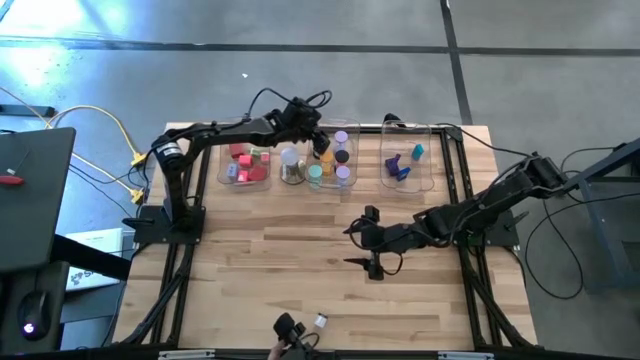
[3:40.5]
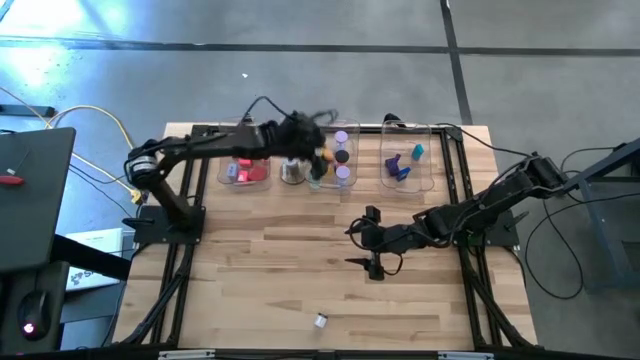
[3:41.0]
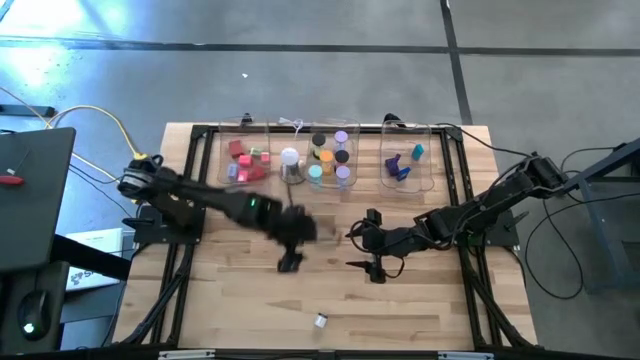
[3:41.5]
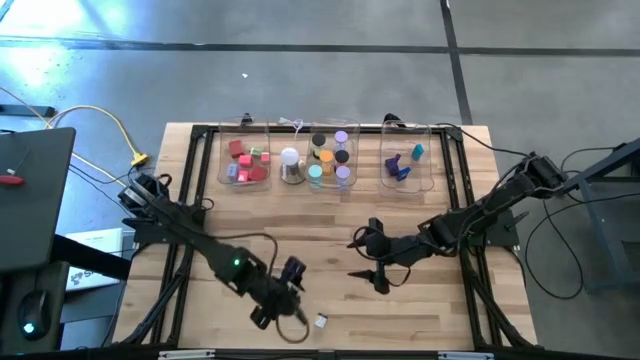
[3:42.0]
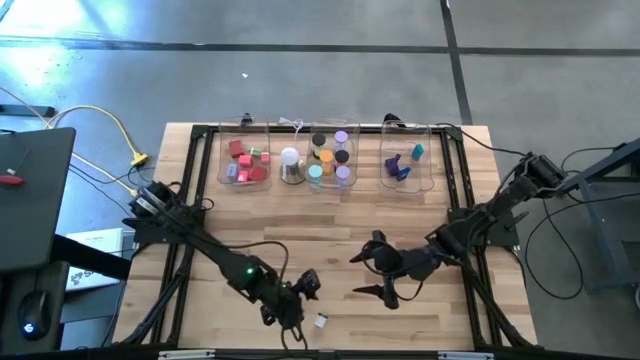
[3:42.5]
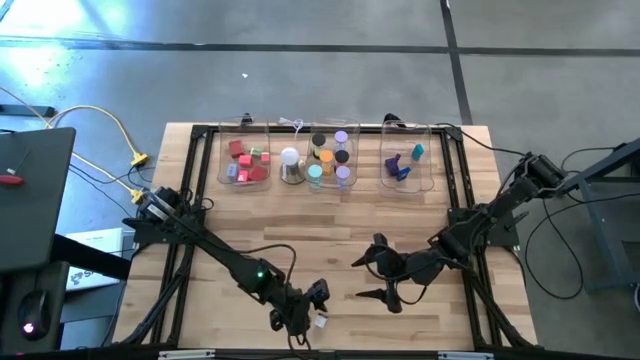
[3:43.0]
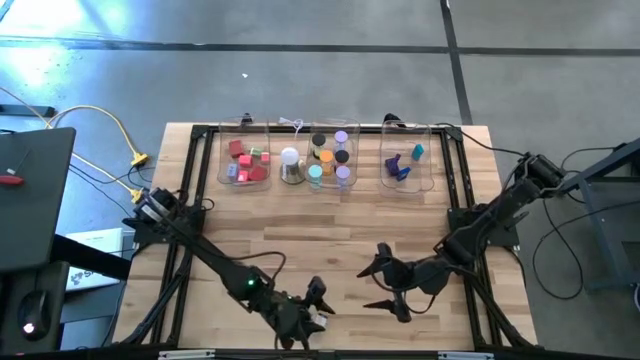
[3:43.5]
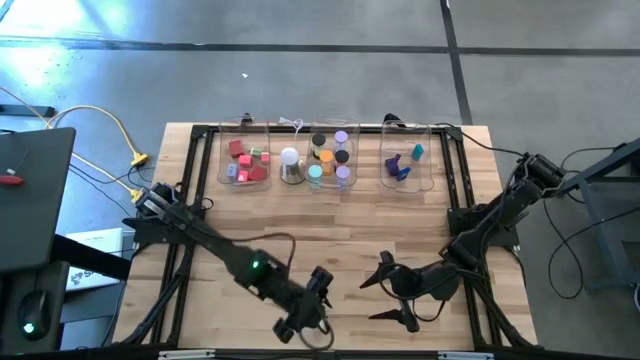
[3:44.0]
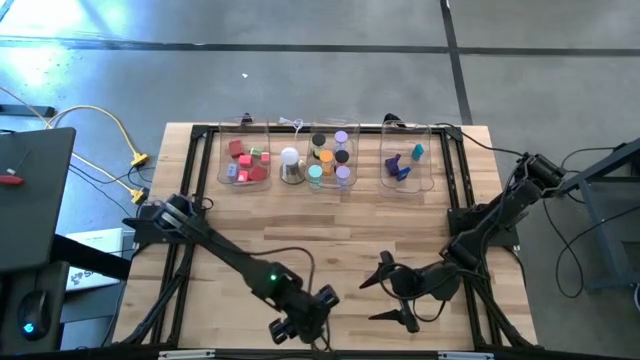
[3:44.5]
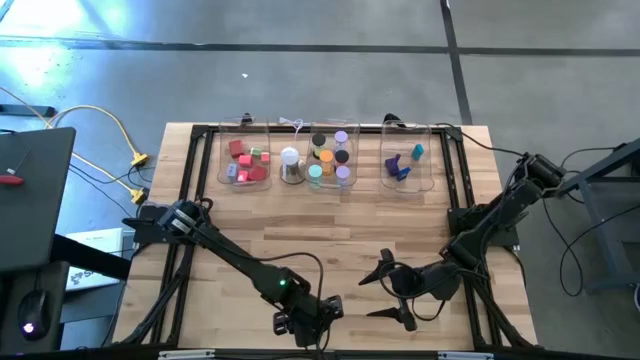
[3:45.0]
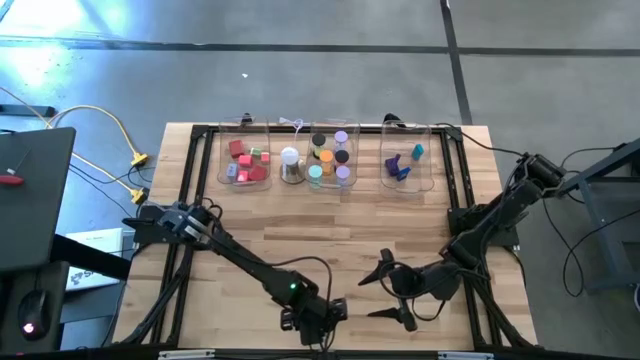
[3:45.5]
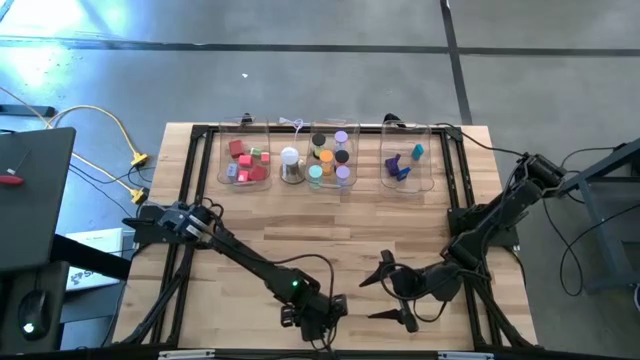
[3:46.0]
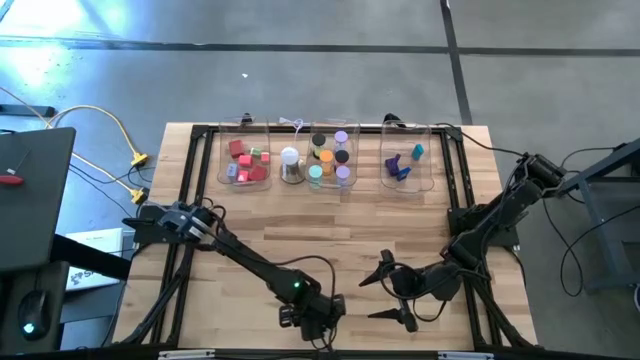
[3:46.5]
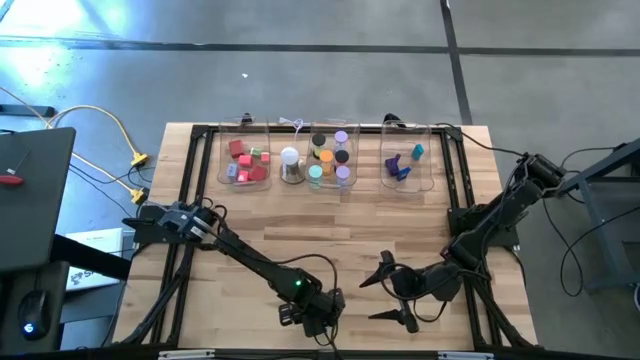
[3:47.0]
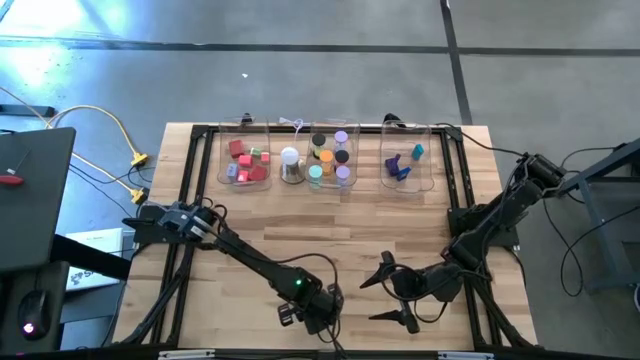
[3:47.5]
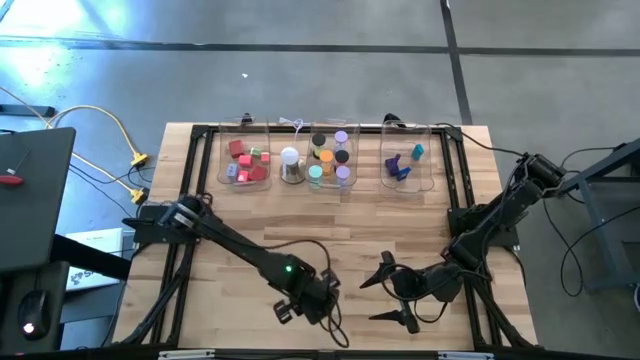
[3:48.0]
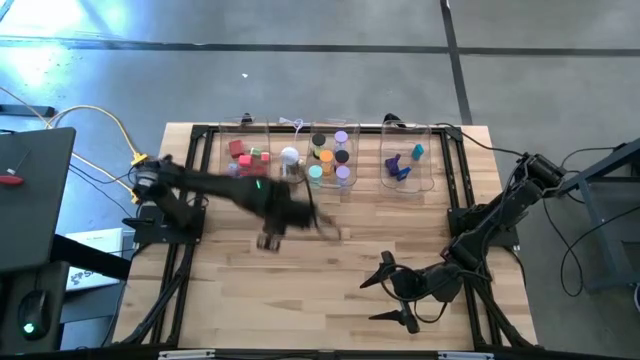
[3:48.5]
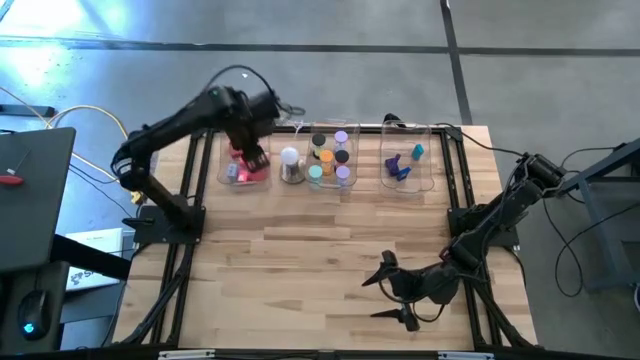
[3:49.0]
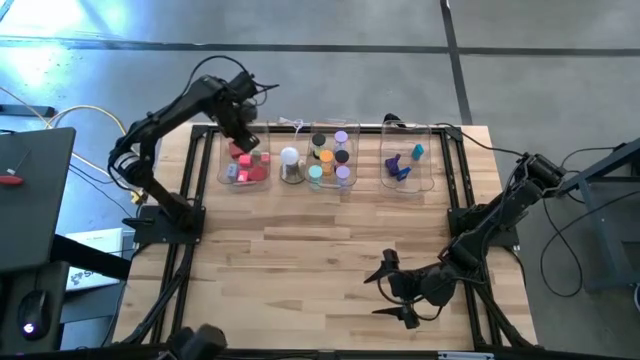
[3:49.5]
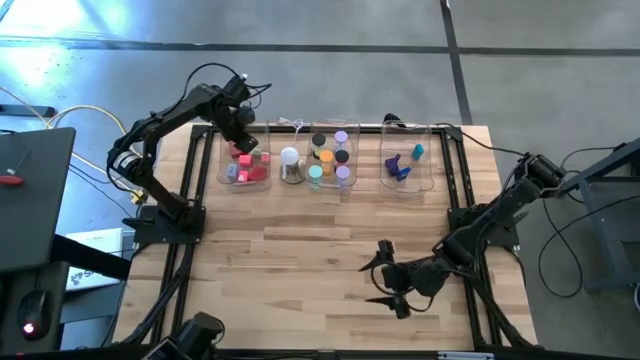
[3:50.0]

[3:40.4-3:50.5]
Task: Pick & Place Office items
Put the white charger adapter into the left transparent bin

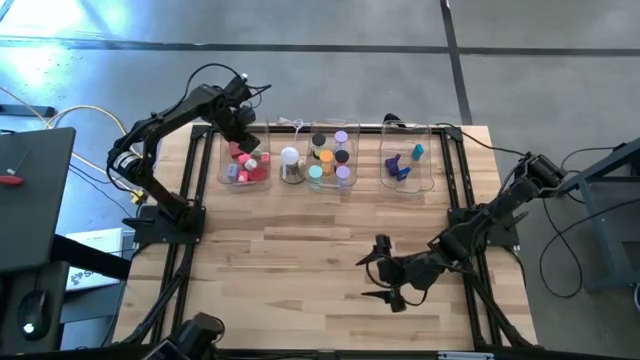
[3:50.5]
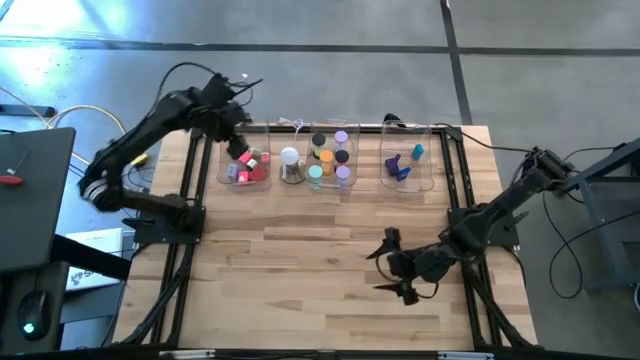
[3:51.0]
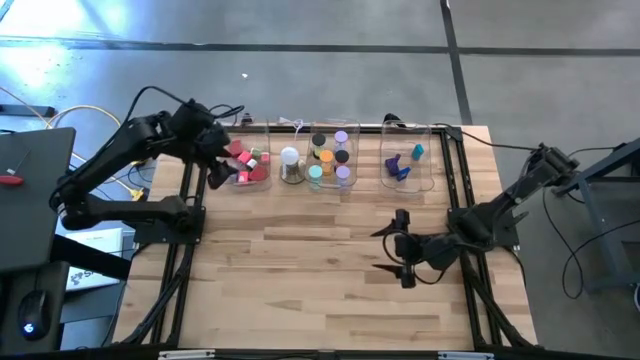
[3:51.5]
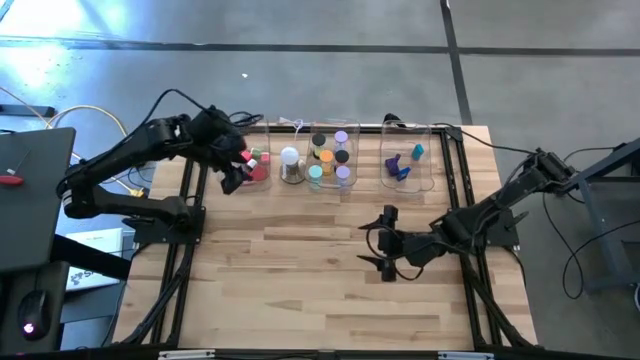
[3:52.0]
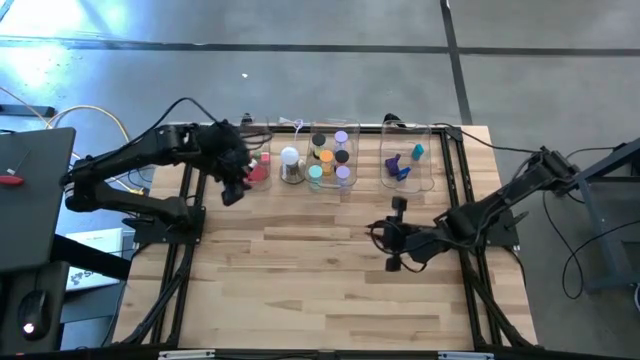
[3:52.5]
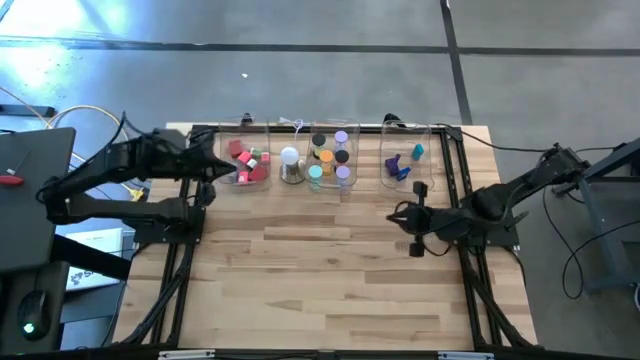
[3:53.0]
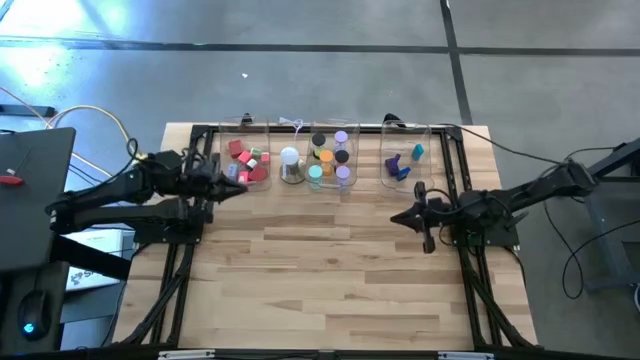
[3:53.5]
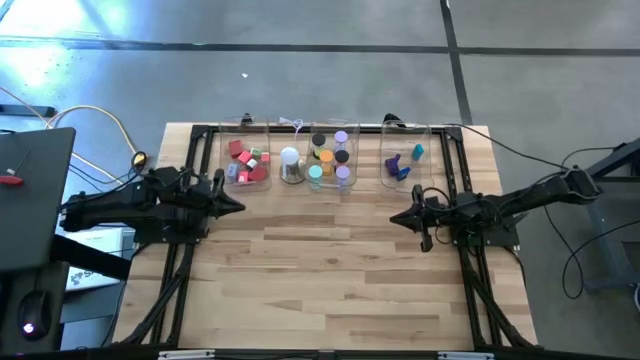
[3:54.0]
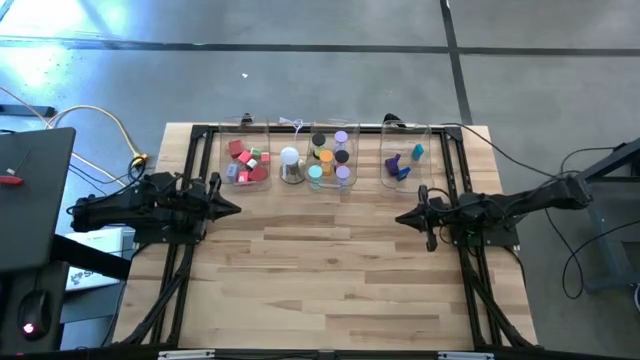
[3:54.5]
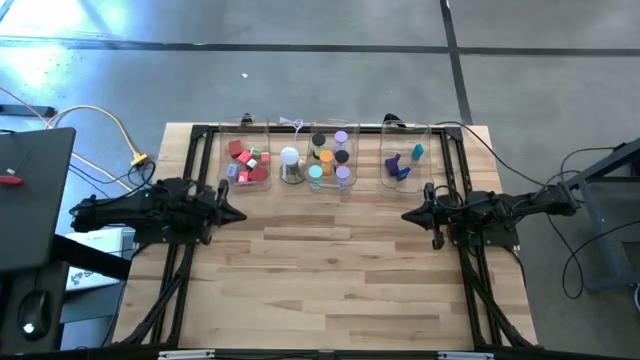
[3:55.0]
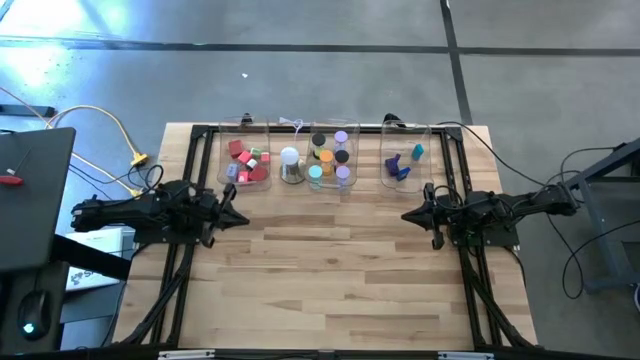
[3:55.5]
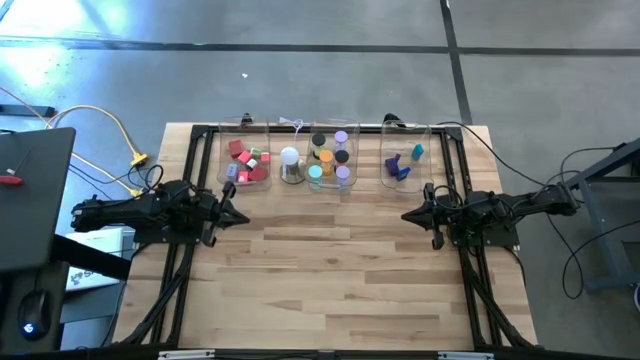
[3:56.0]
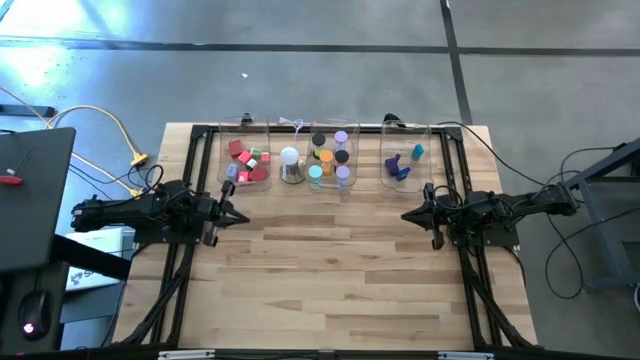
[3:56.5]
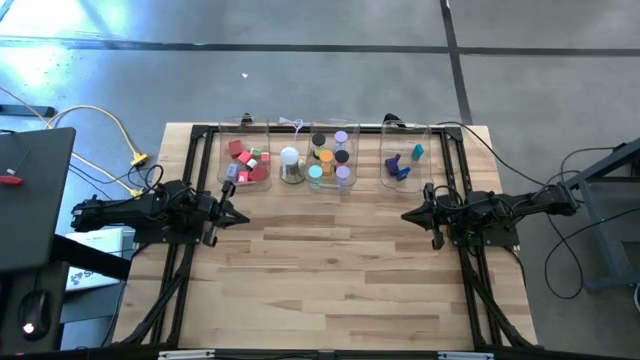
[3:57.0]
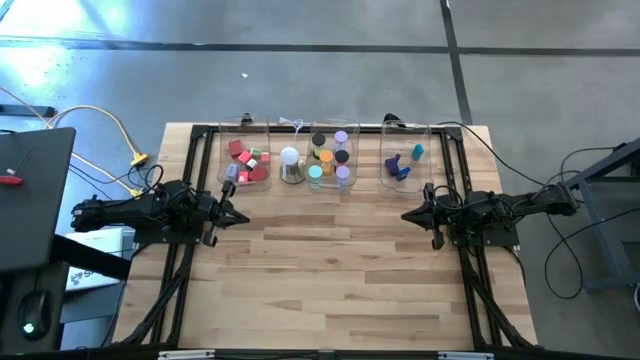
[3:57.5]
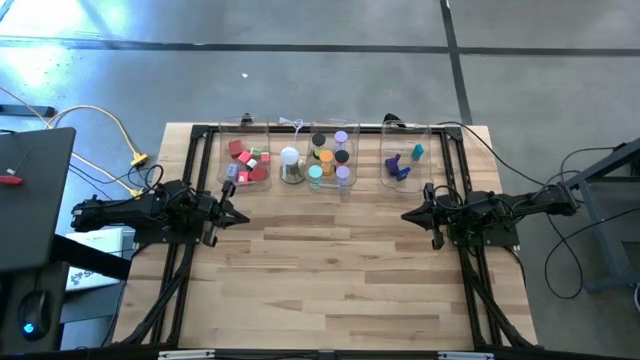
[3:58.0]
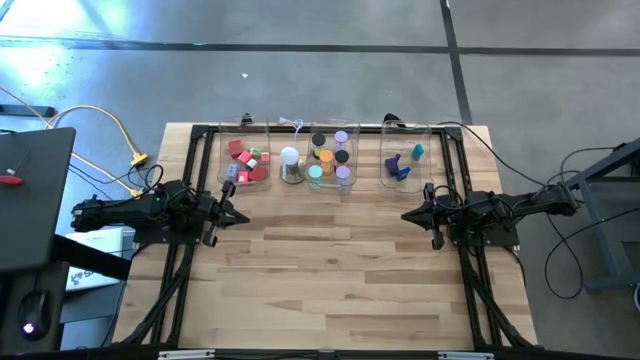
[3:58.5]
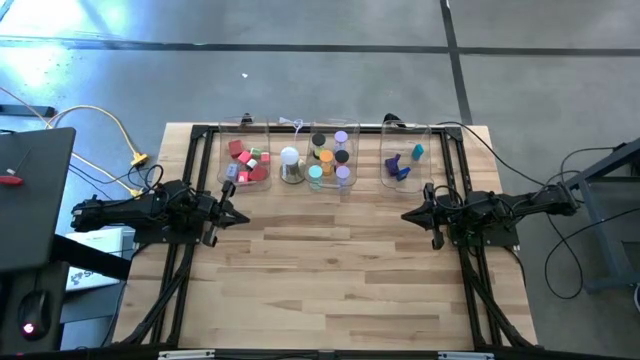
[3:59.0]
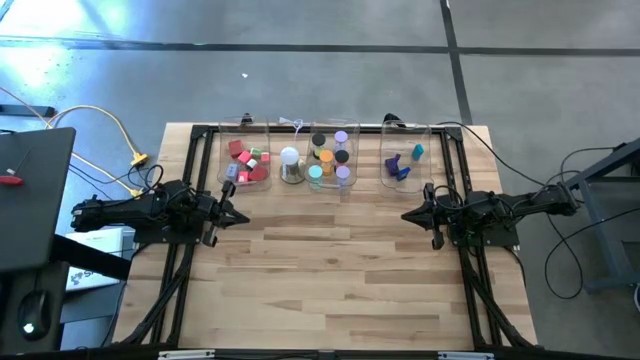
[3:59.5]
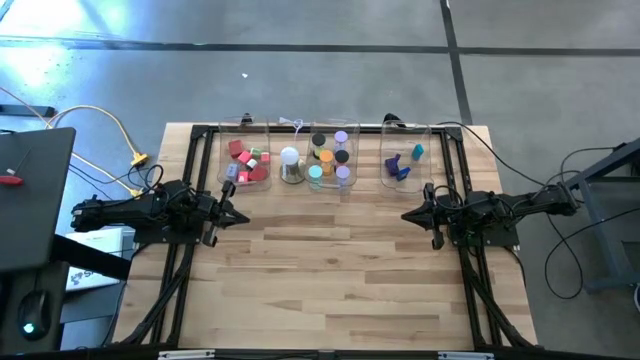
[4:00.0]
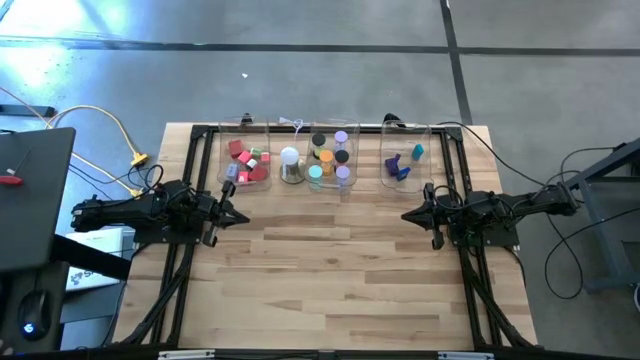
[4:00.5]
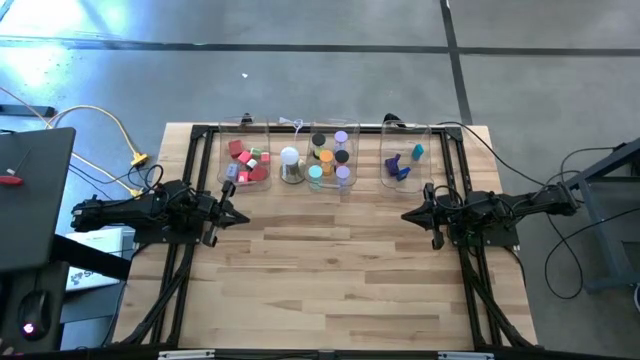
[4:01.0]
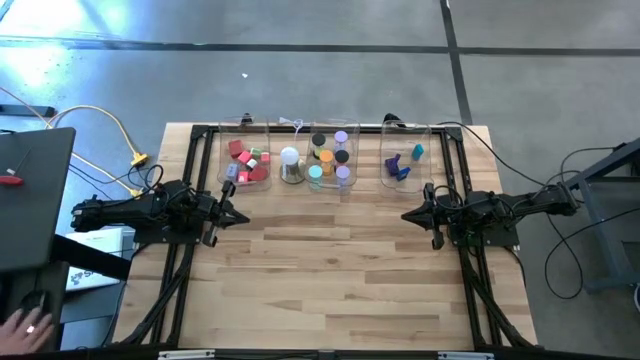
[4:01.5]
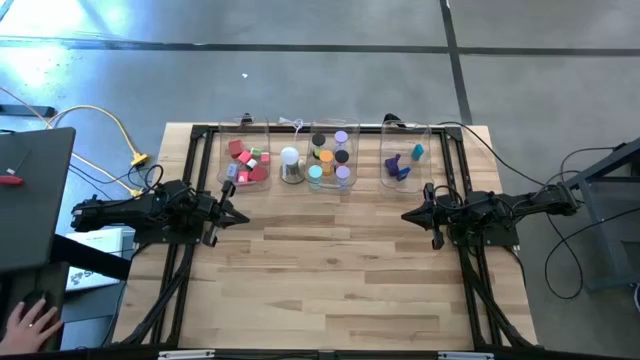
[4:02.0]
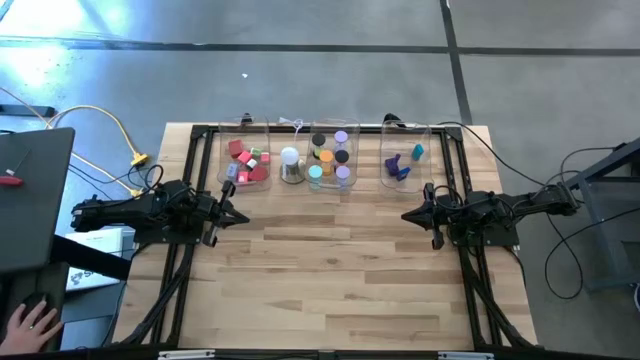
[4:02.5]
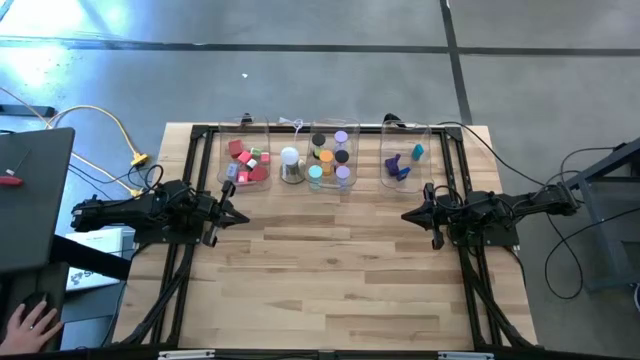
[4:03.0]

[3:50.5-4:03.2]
Return to Home Position
